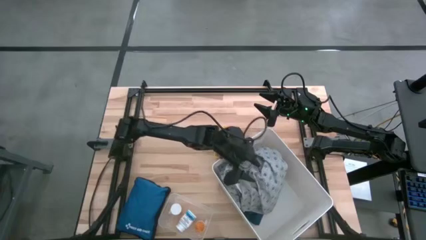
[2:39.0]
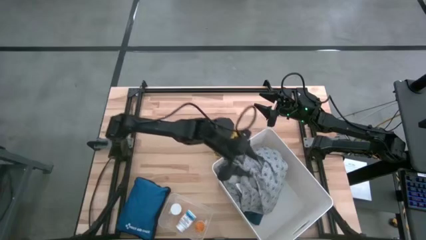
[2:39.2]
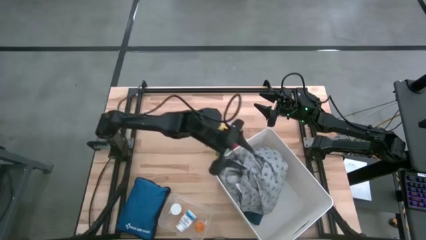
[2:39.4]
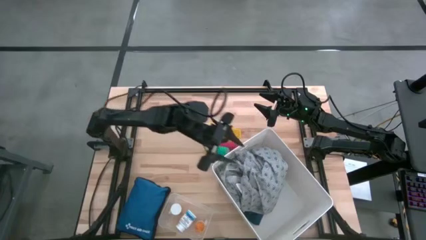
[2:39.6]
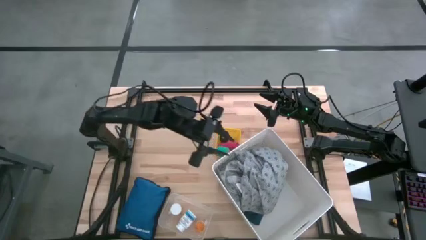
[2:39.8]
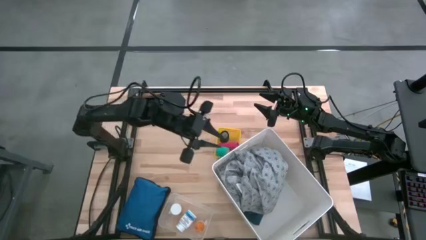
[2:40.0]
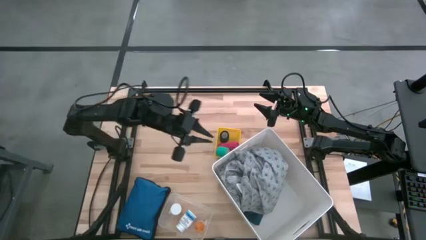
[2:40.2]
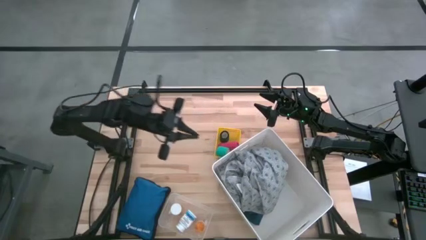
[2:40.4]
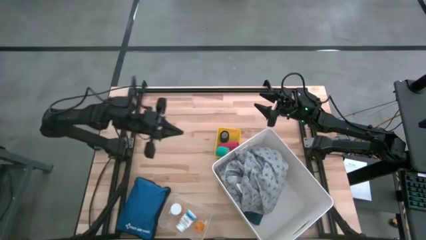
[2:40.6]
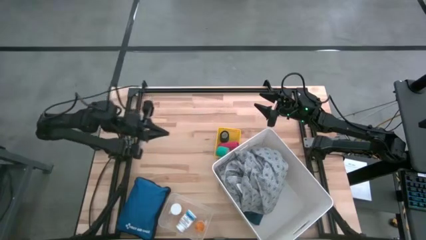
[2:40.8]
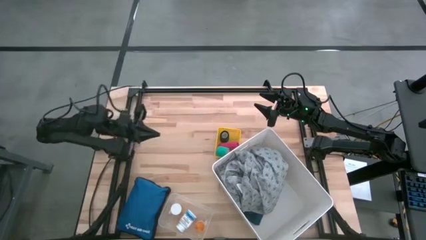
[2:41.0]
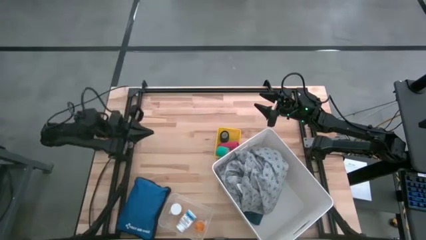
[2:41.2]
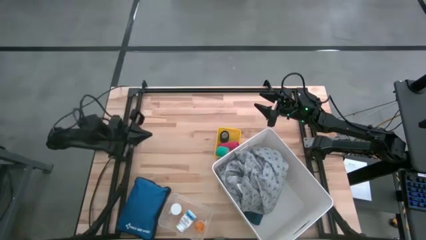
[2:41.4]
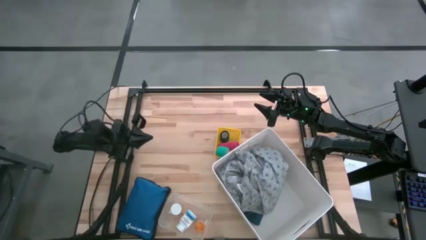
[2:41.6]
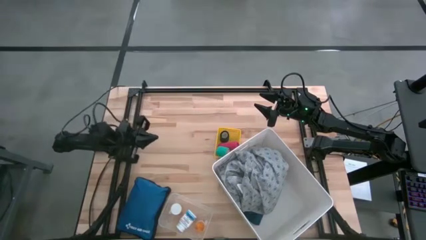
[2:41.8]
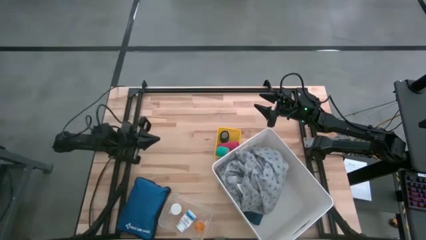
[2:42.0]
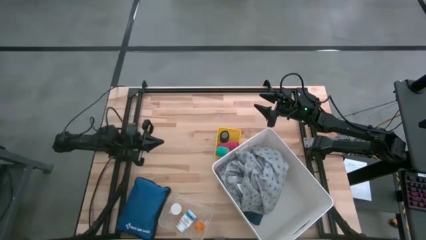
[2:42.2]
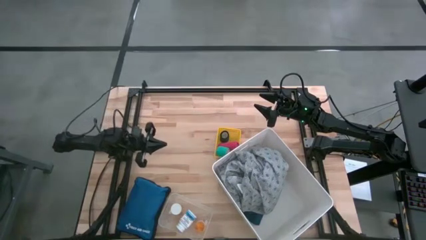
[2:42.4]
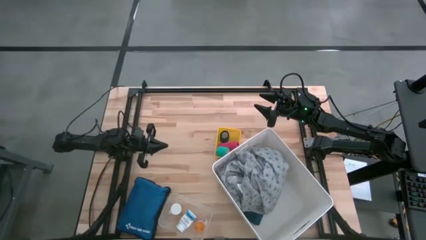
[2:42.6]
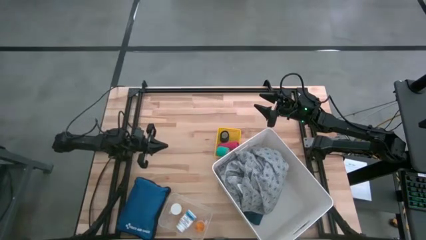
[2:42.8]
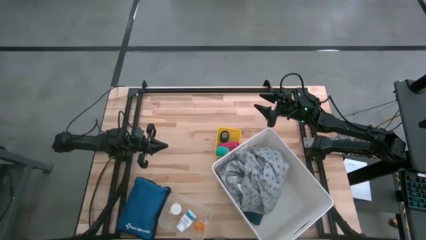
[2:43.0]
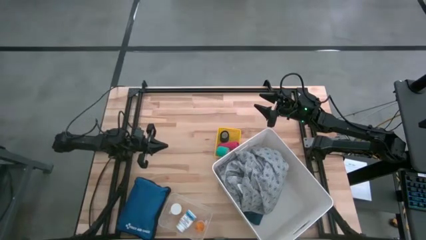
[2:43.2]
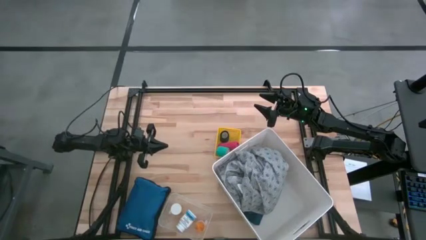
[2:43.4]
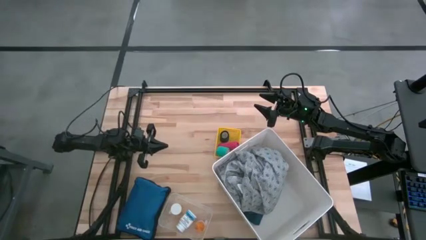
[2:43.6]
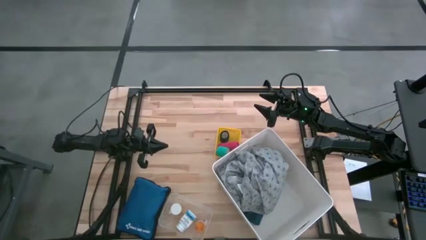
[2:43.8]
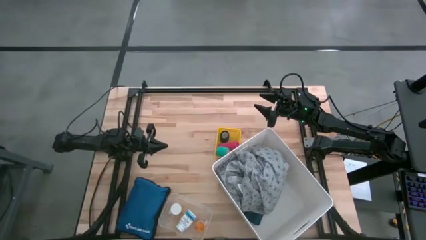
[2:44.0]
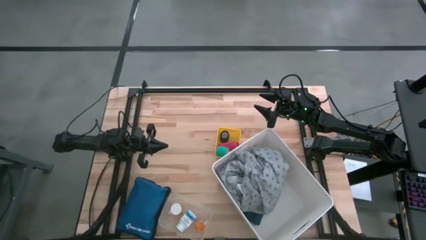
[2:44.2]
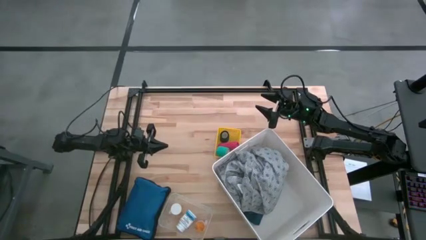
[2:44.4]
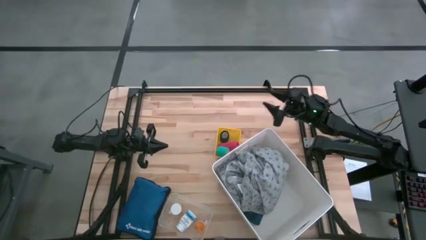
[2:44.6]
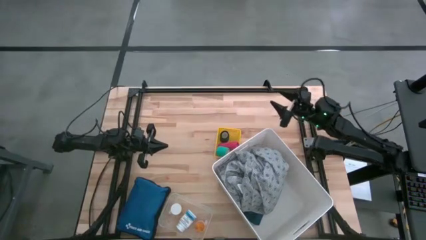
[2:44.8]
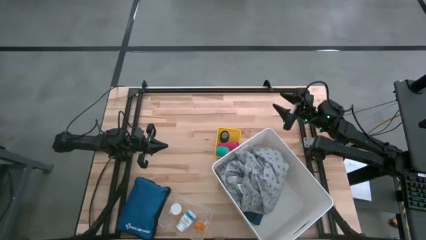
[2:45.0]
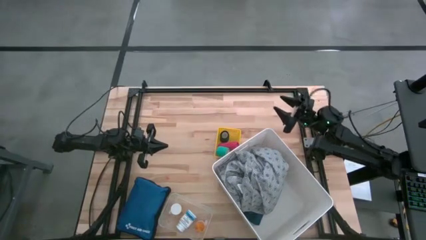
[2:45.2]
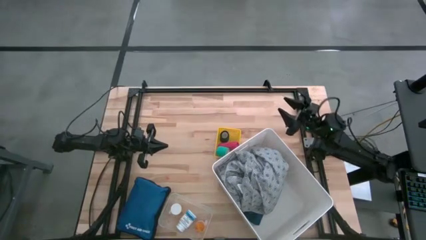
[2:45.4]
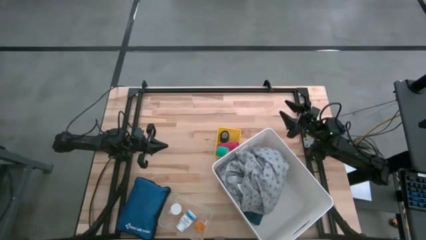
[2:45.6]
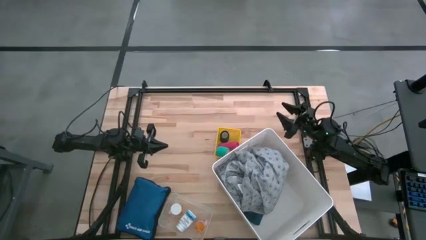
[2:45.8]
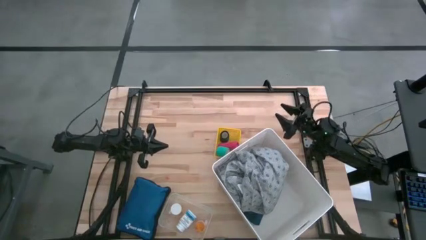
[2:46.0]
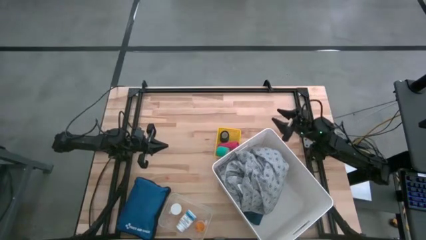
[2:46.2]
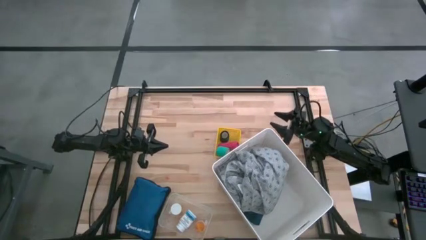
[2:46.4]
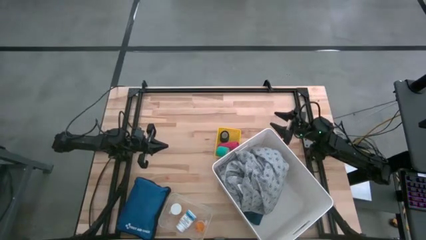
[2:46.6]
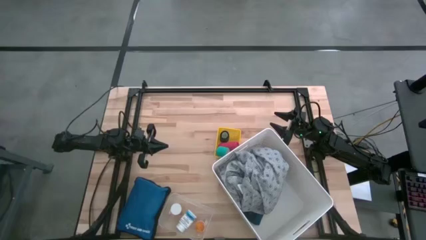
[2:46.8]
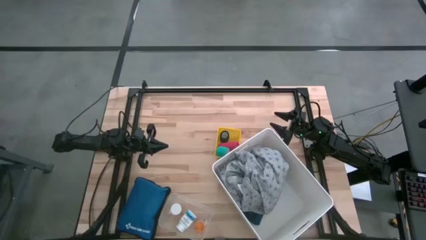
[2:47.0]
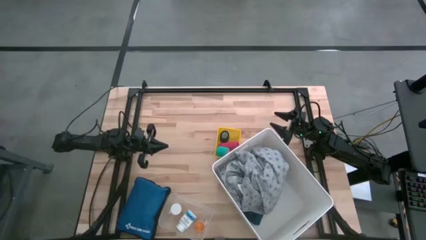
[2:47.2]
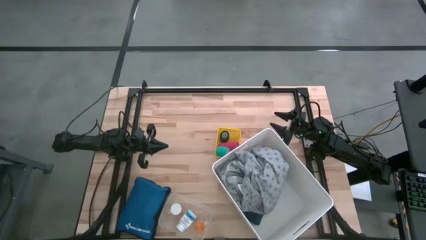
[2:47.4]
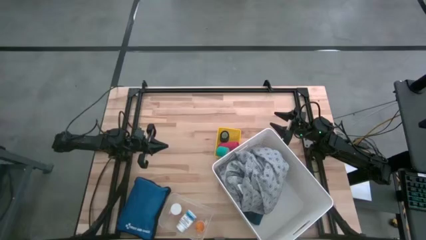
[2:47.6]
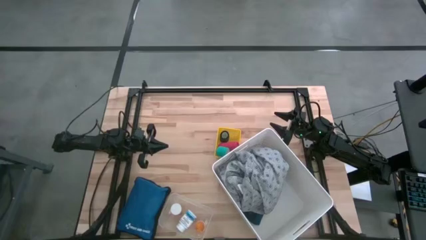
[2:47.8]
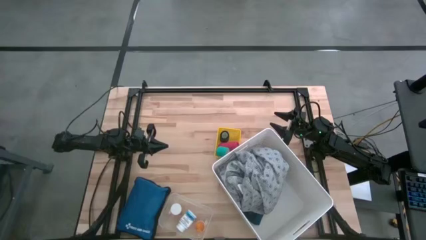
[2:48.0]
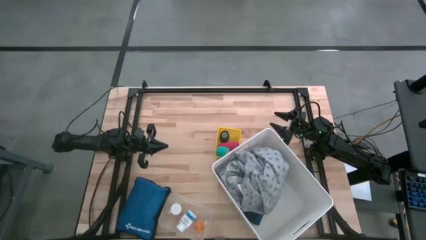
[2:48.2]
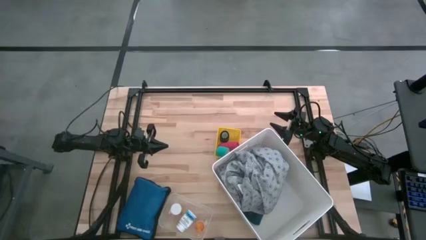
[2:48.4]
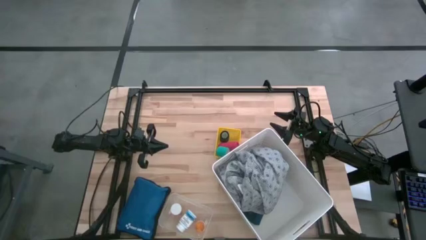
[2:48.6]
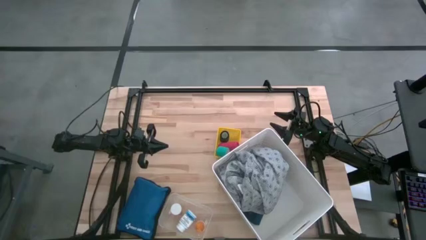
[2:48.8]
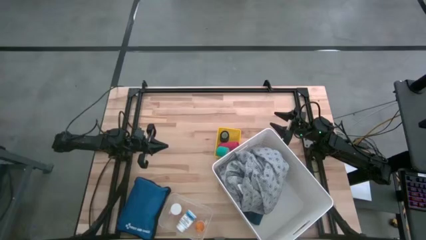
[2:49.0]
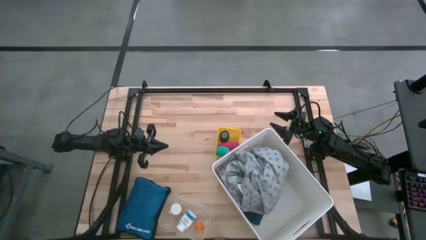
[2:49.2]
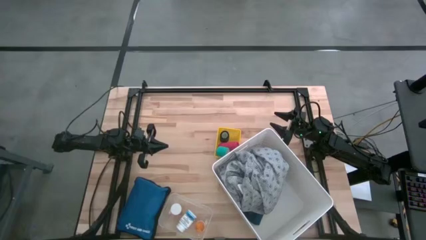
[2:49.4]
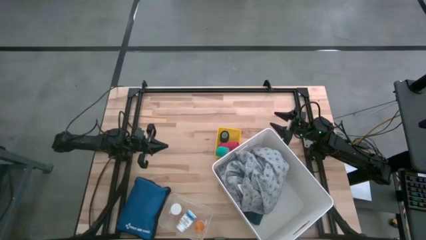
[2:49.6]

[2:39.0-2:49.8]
Task: Pick & place medical supplies in basket/bin
Return to Home Position

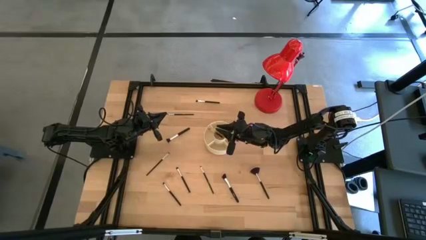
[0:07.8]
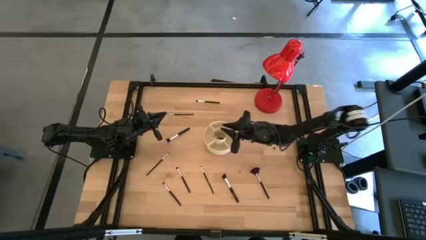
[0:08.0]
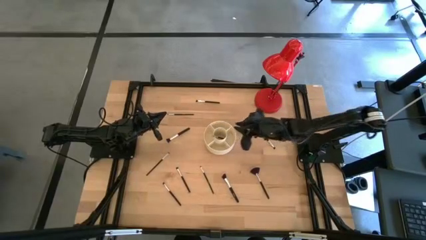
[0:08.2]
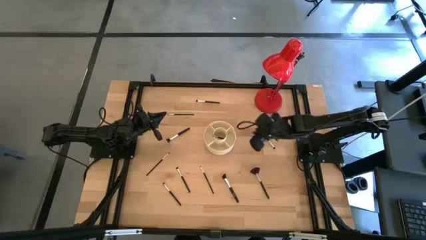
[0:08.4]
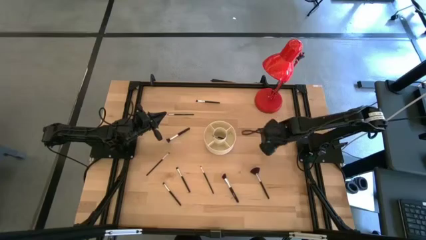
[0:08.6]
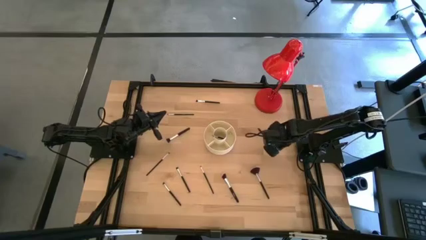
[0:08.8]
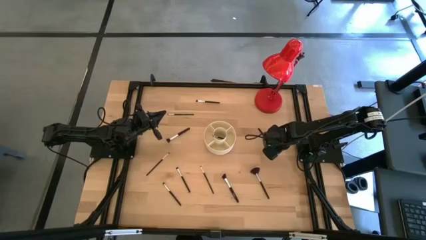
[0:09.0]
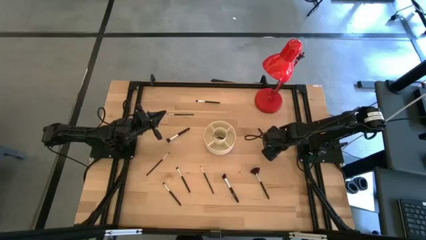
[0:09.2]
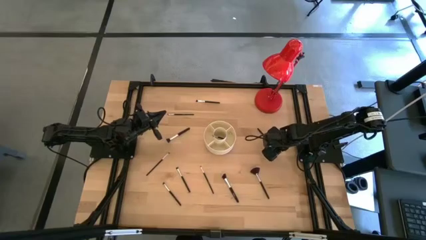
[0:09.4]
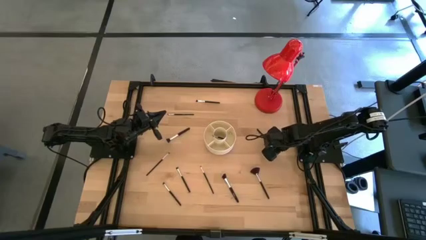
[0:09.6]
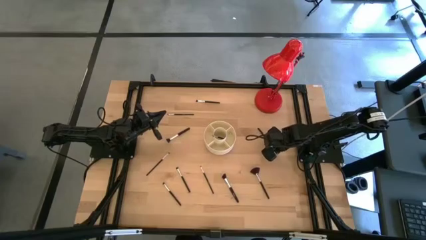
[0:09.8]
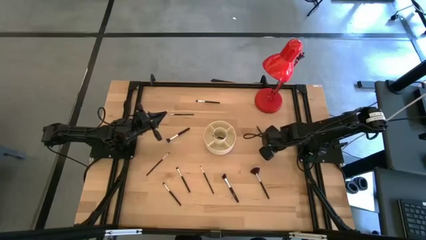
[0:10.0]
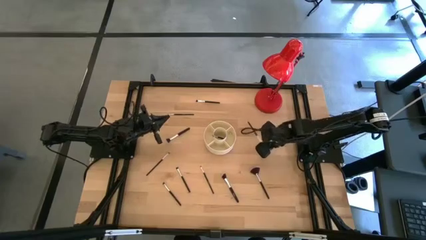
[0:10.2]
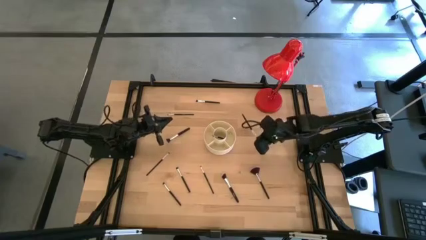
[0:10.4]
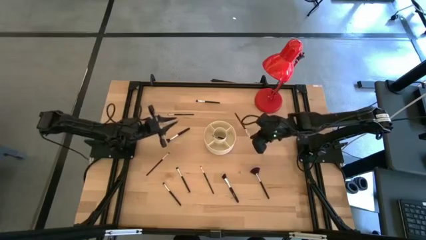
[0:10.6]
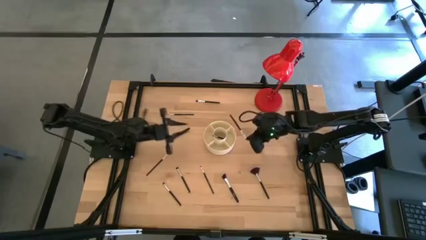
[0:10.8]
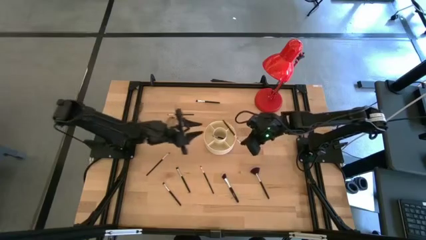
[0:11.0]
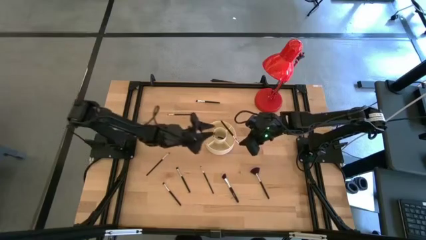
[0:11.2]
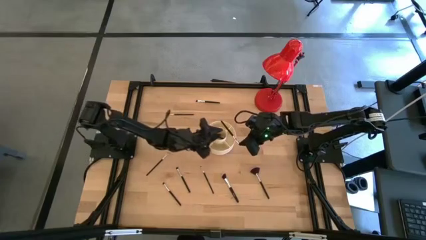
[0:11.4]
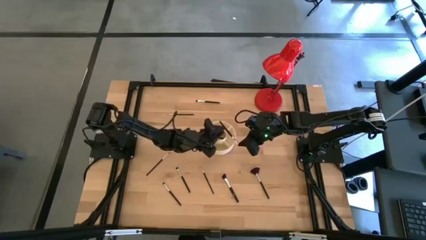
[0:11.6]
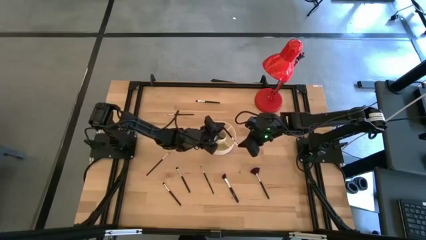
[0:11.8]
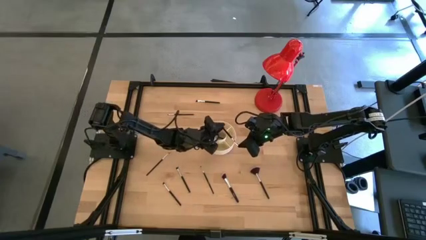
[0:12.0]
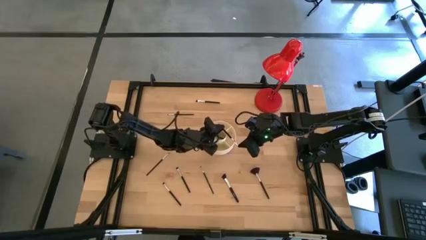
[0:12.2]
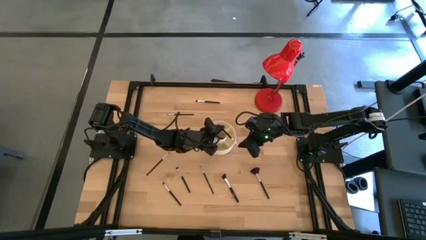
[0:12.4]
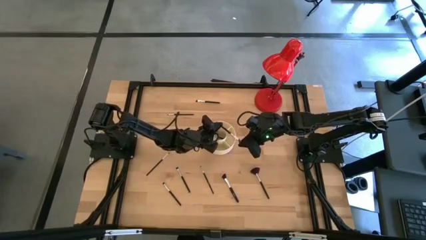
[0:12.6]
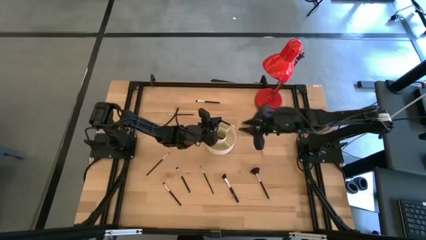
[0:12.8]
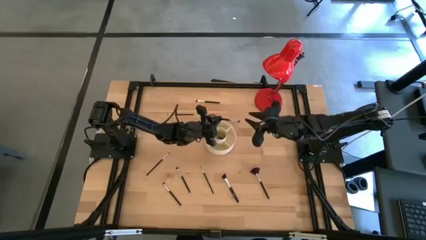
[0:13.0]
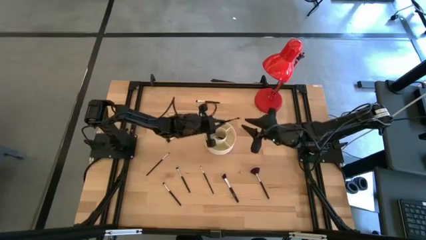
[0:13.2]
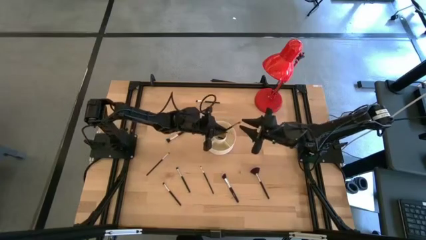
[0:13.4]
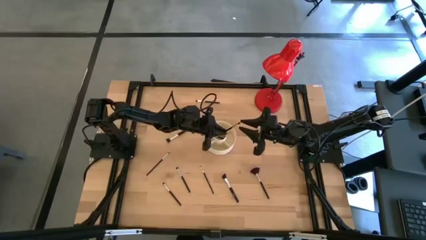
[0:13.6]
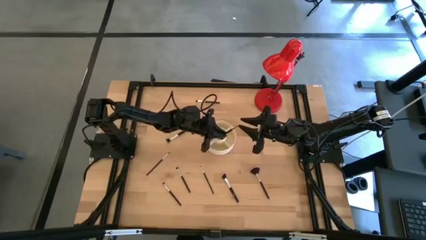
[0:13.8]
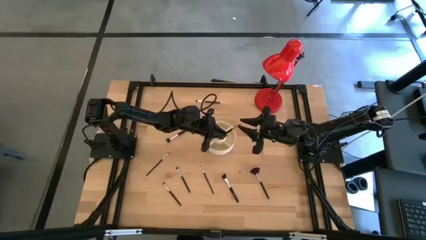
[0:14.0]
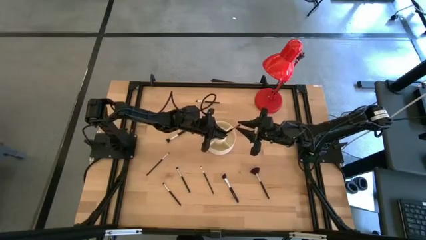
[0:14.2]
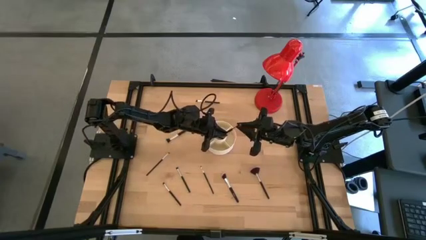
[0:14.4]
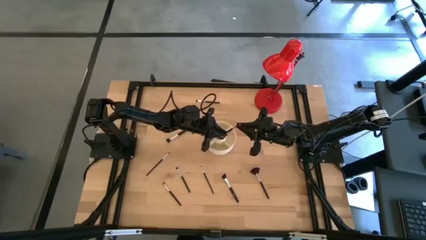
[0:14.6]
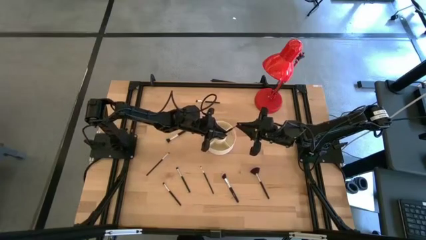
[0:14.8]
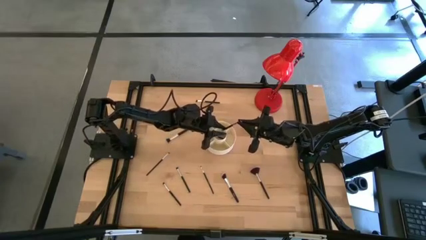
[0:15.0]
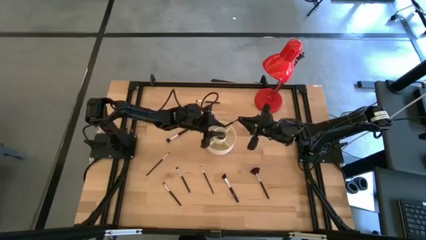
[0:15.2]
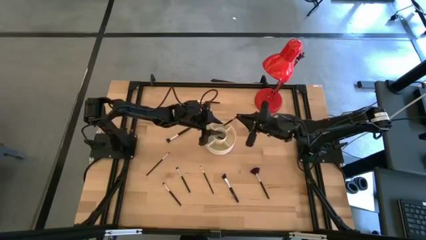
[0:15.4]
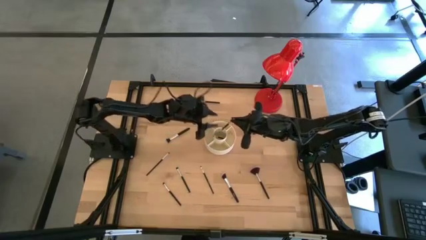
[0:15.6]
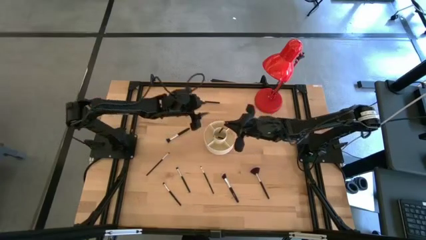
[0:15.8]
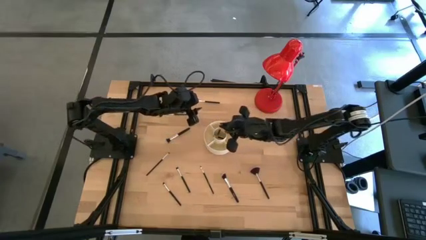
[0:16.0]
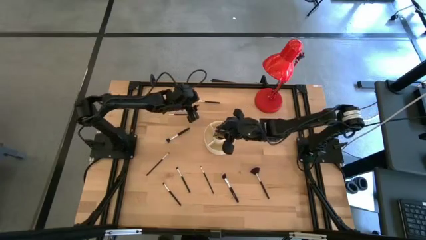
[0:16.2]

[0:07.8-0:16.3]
Task: Put items in baskets/containers
Put the eyeshadow brush into the brush organizer
